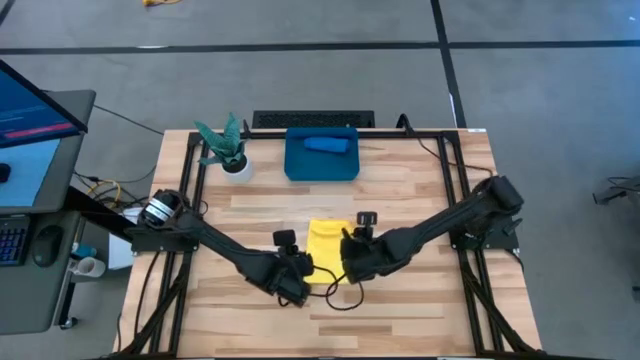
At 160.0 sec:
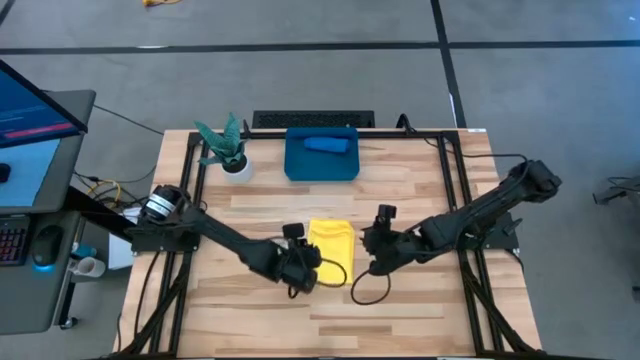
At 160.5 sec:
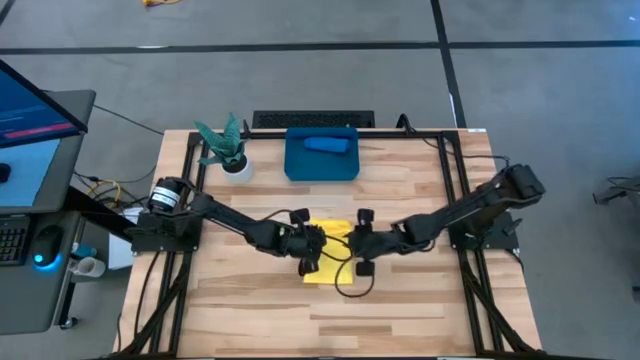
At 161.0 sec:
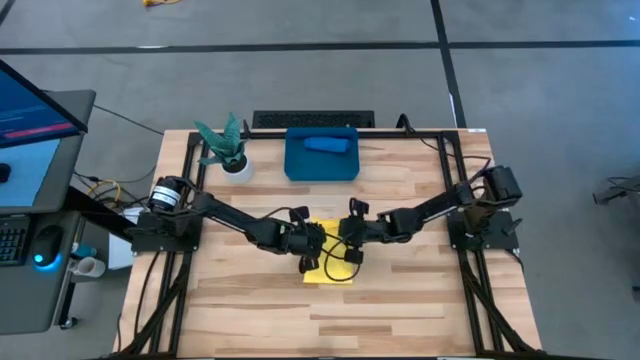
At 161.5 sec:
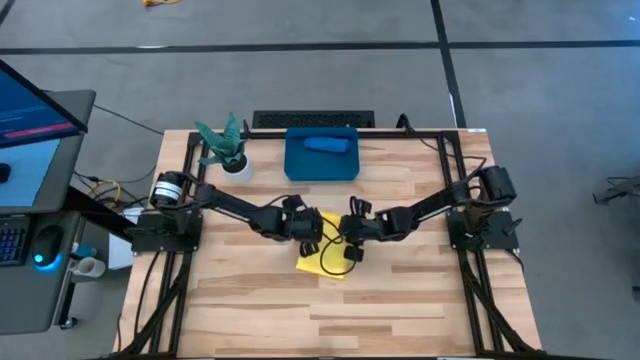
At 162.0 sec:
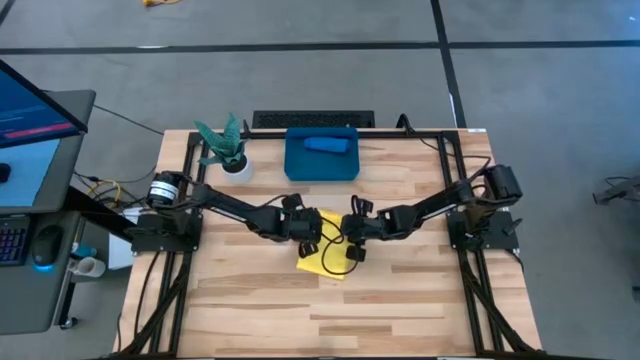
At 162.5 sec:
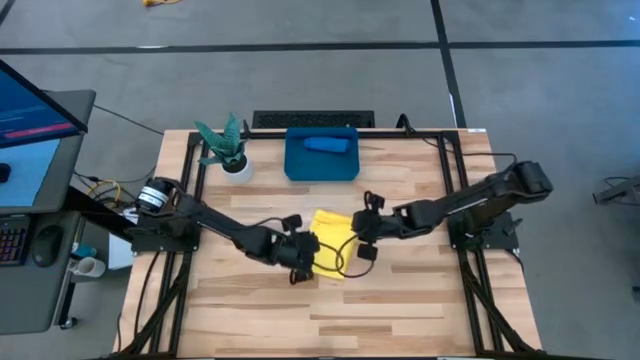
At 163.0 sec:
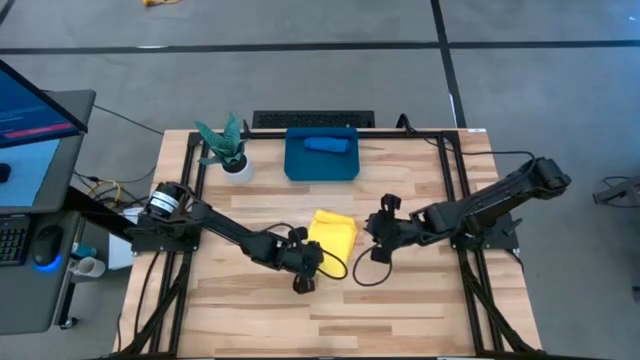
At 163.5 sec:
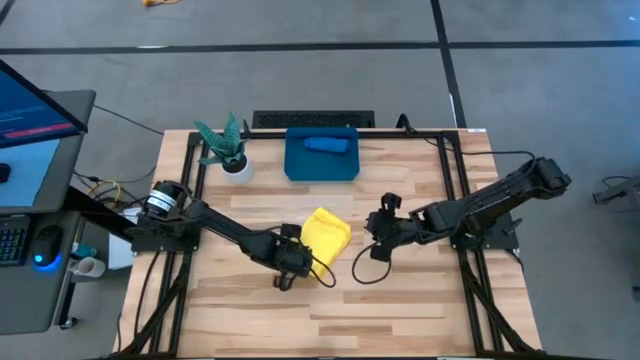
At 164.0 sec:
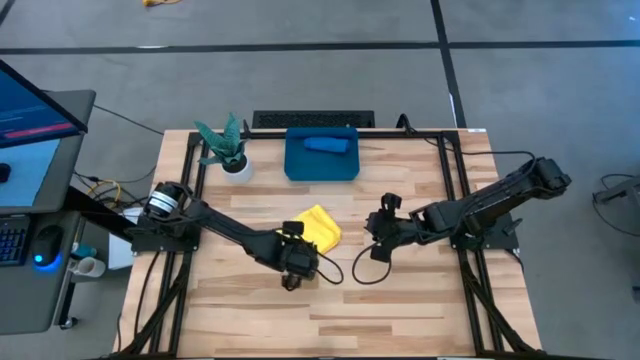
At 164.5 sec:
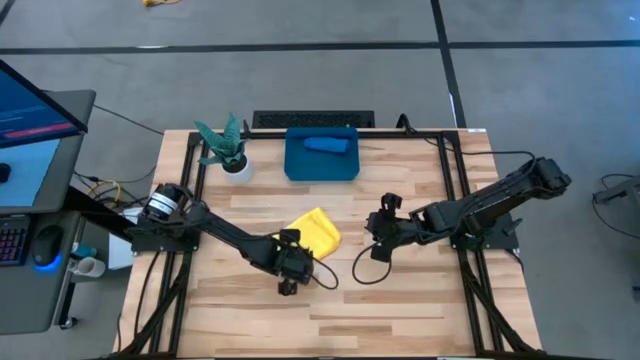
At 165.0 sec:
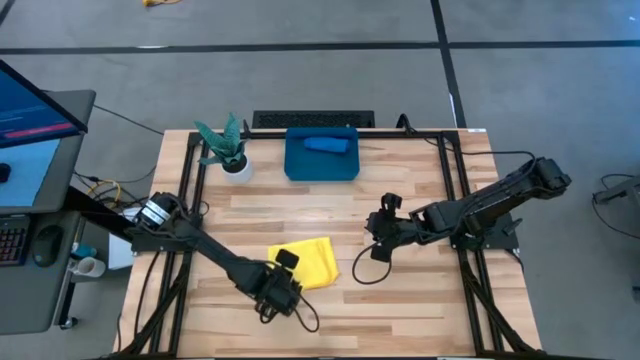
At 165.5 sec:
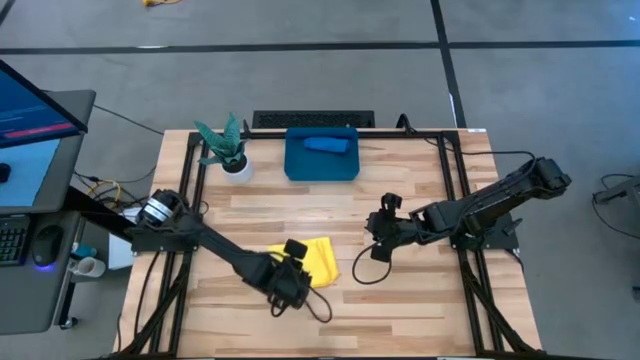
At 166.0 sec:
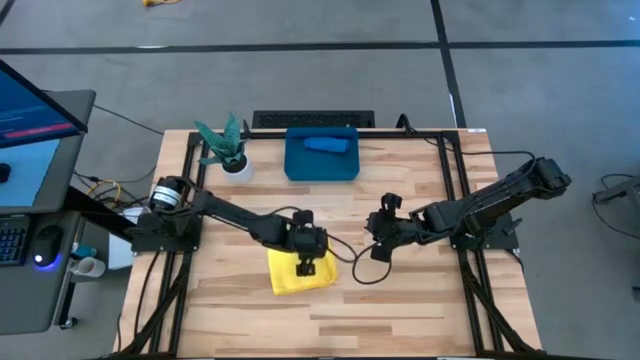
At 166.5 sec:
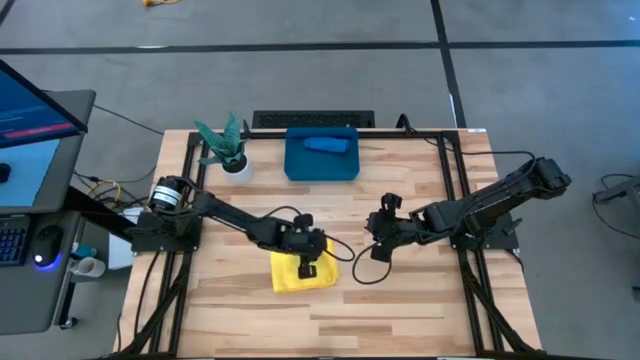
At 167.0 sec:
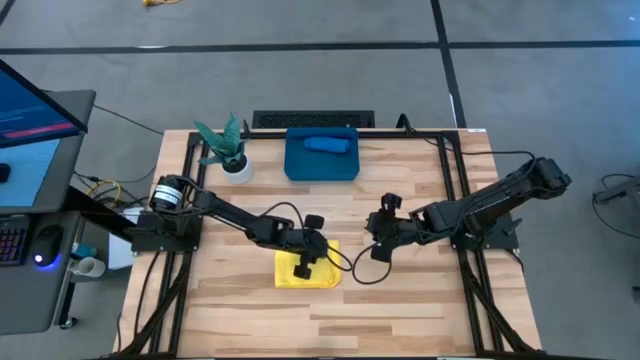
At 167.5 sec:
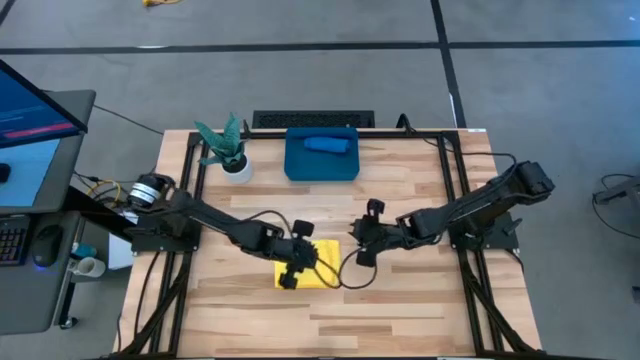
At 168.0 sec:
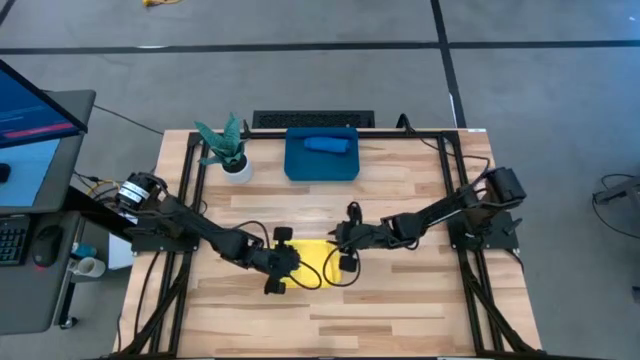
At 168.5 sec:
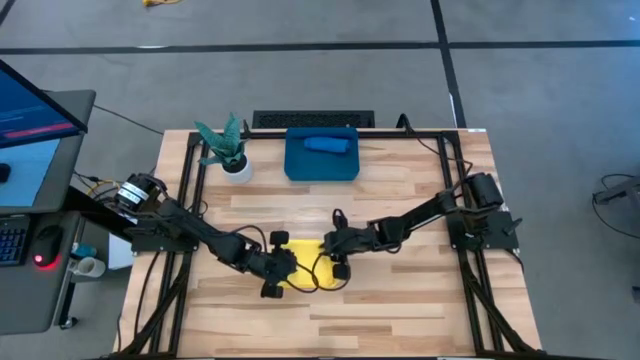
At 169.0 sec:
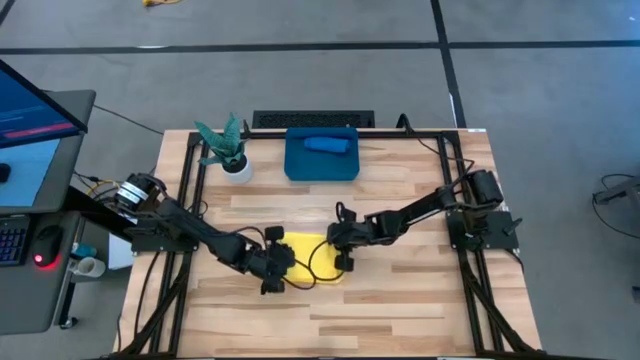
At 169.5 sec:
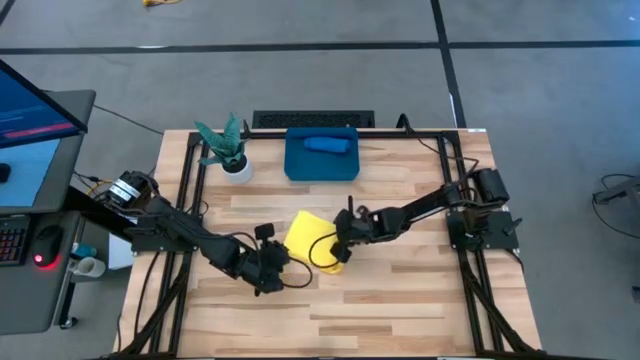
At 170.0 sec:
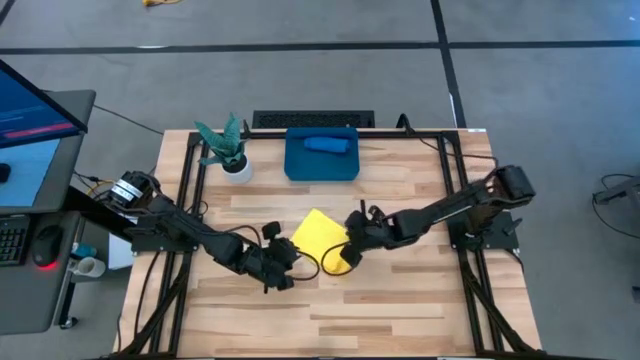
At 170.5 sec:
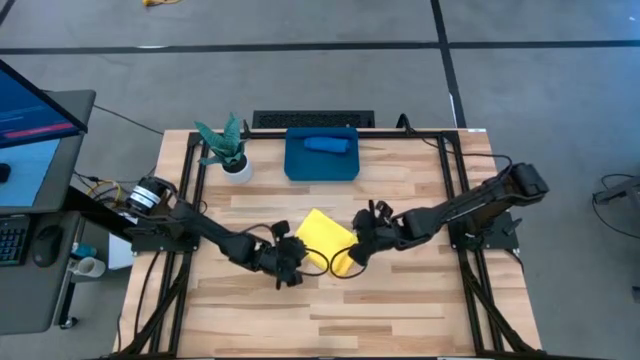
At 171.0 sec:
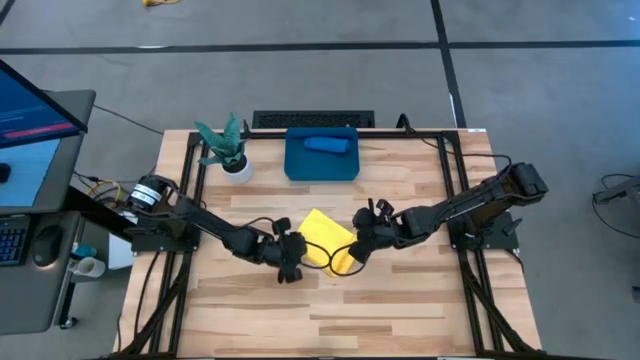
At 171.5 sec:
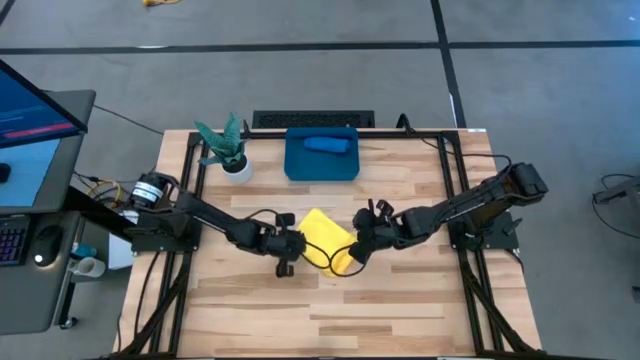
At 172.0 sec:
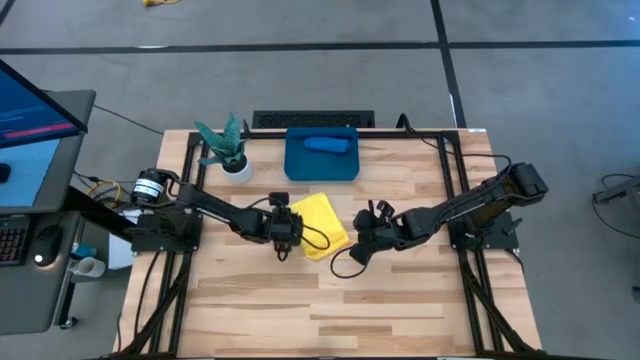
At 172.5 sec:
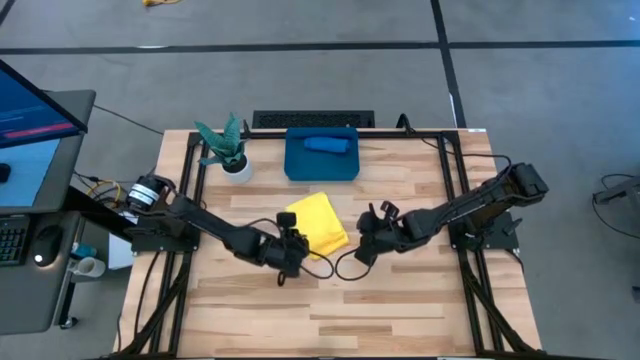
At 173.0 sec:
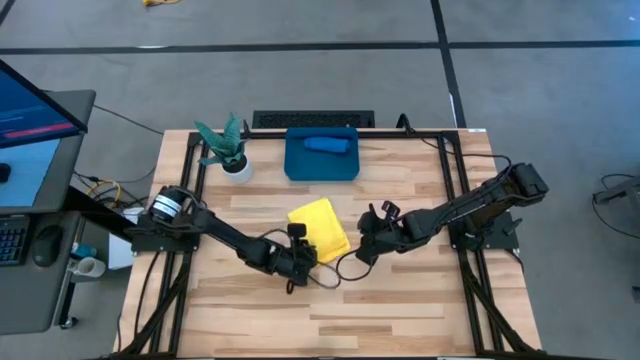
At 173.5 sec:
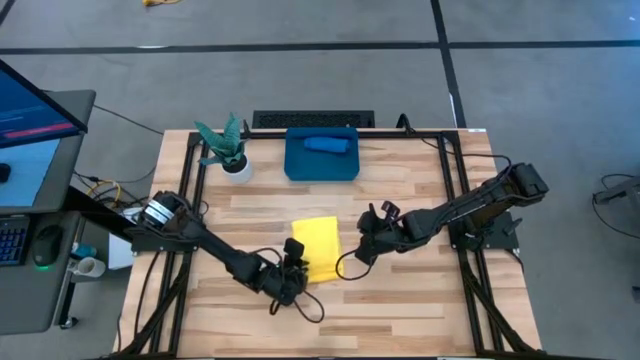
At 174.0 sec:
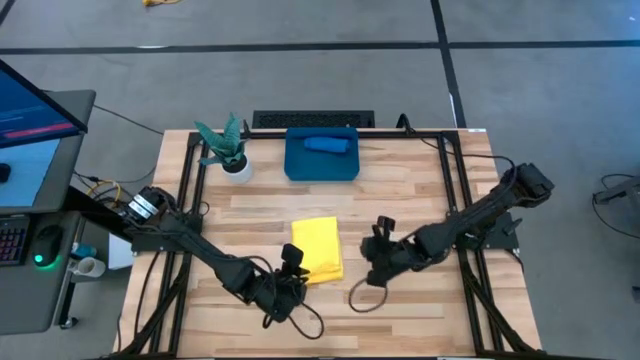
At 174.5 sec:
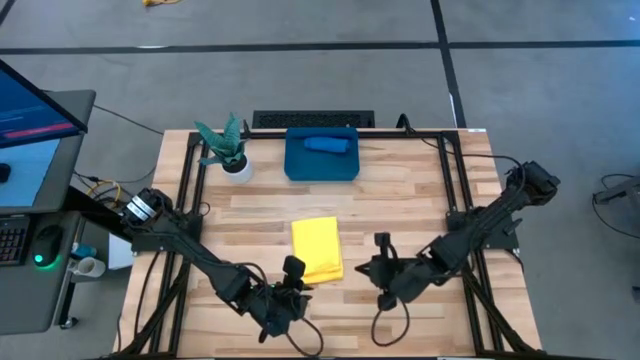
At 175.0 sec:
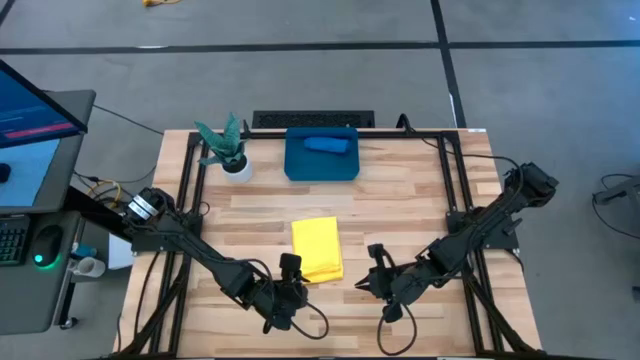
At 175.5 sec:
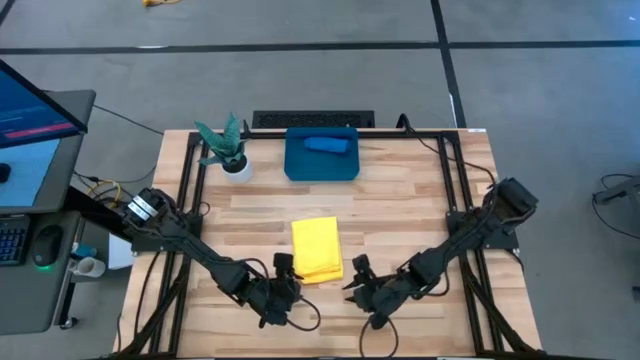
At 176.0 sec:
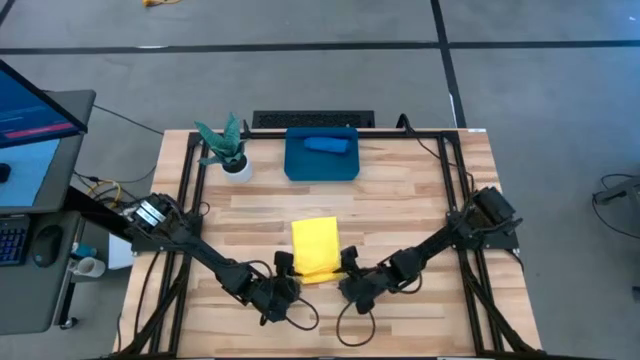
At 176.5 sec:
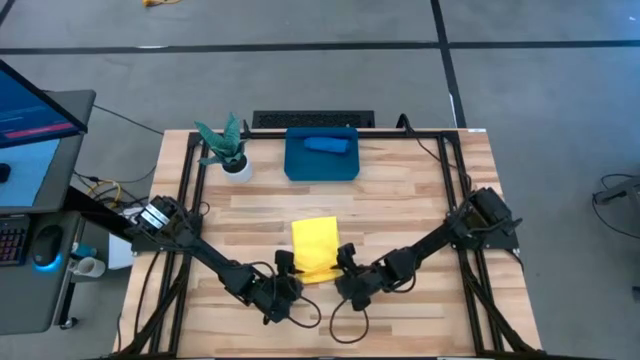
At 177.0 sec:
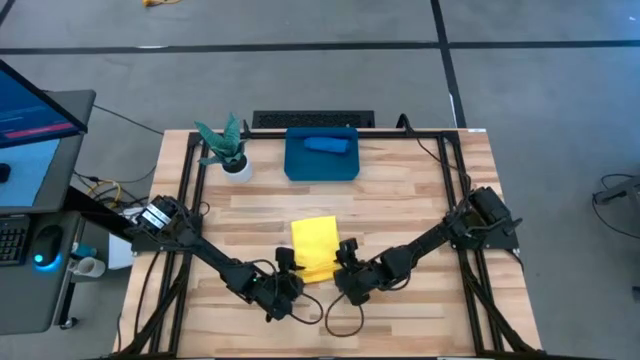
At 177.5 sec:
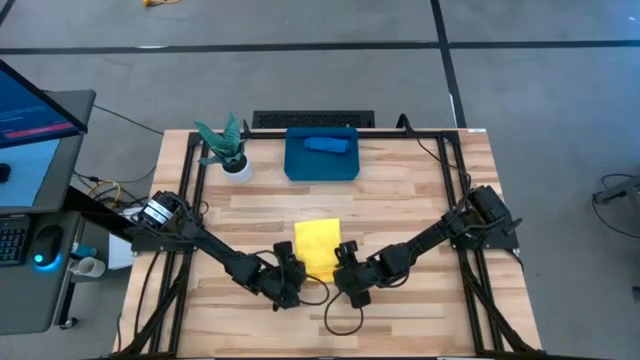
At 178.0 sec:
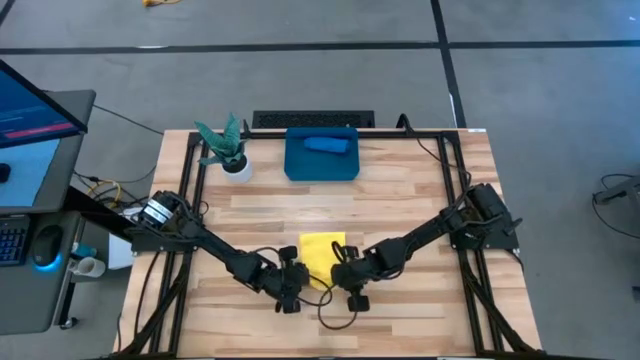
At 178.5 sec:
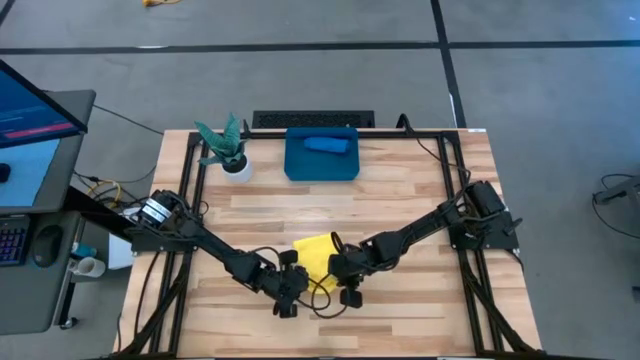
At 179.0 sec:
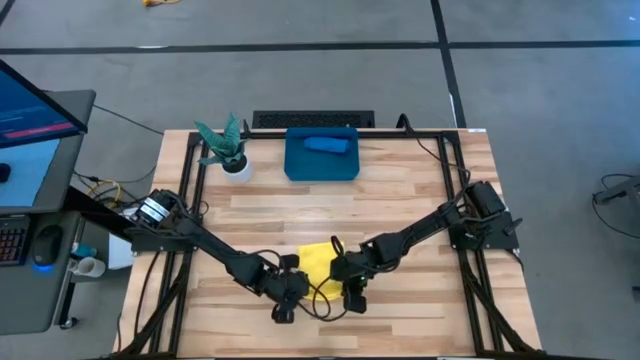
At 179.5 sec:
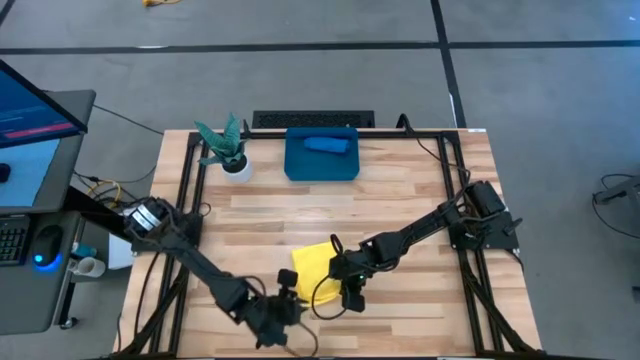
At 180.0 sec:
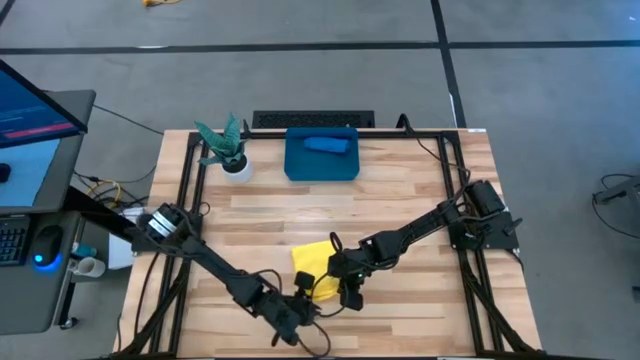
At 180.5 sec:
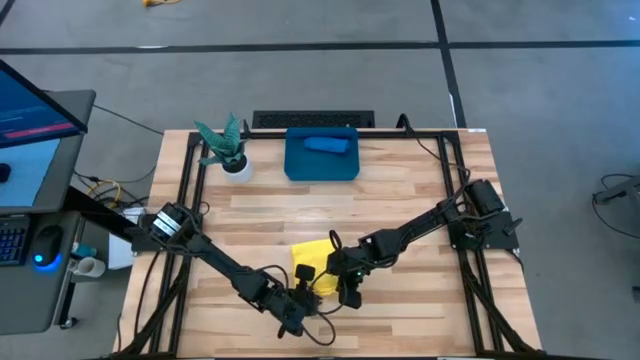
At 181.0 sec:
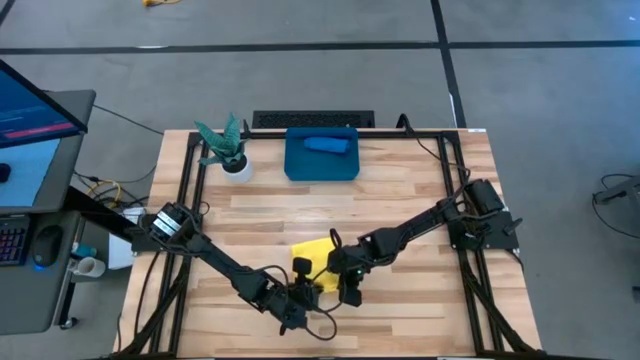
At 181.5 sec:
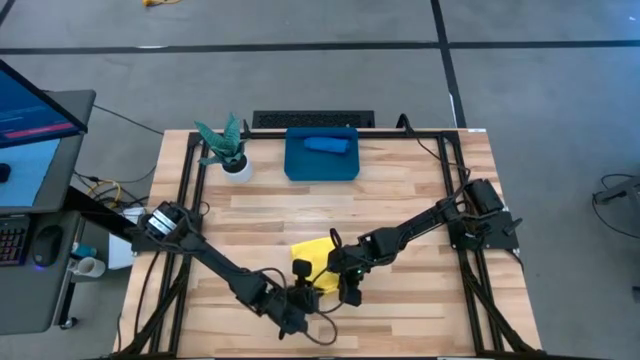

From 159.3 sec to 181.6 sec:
Task: Roll microfiber towels into tight, uniform cylinder then place into a basket
Roll the yellow microfiber towel
